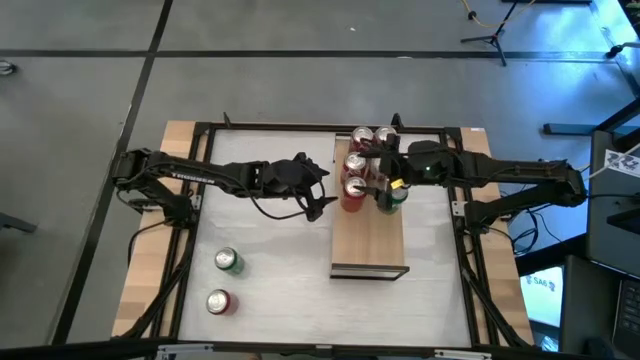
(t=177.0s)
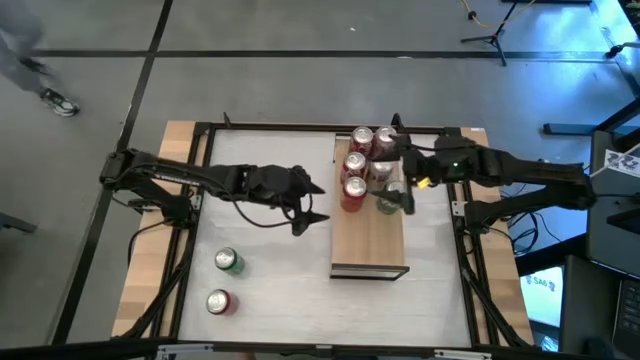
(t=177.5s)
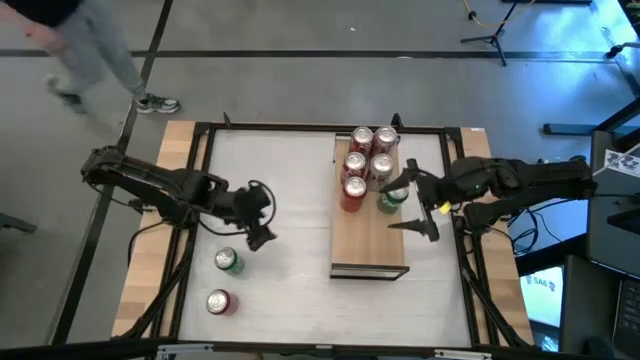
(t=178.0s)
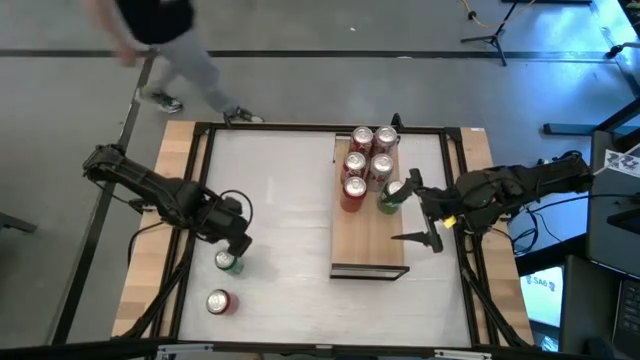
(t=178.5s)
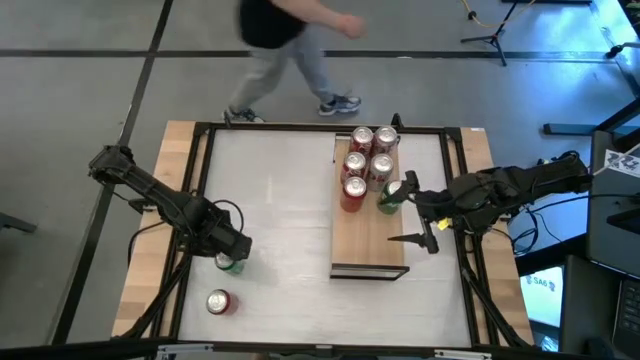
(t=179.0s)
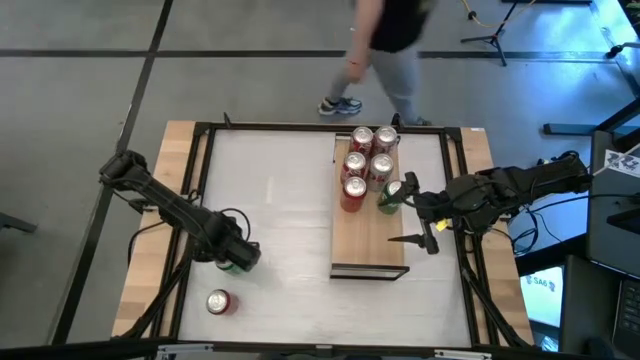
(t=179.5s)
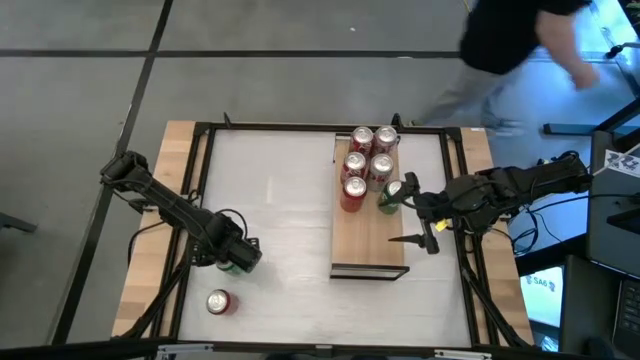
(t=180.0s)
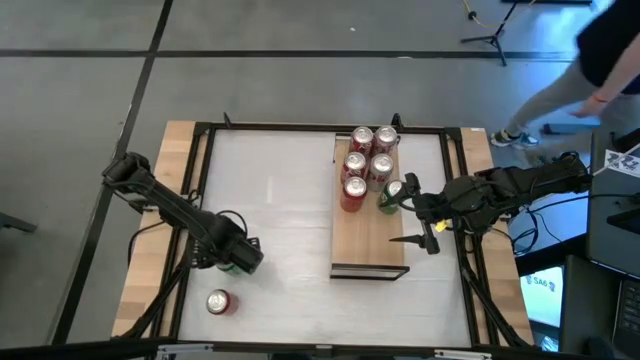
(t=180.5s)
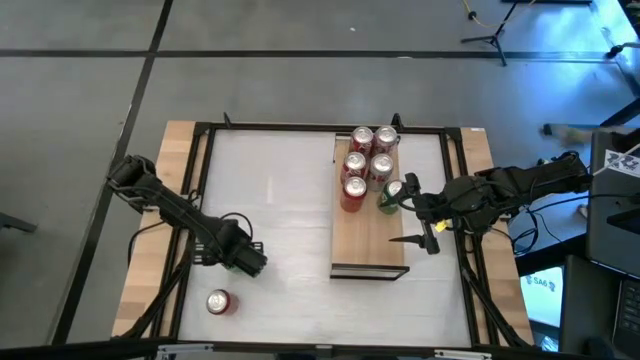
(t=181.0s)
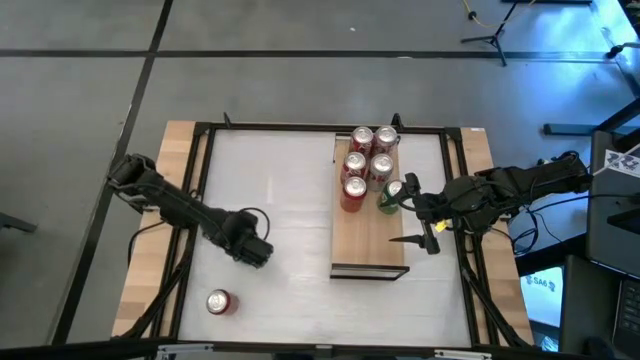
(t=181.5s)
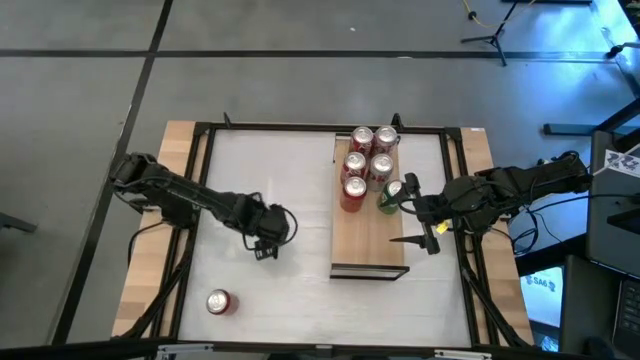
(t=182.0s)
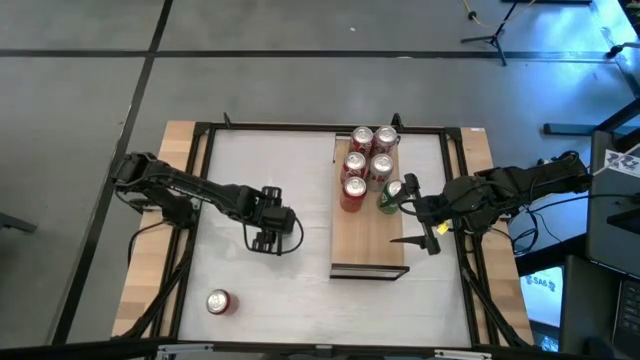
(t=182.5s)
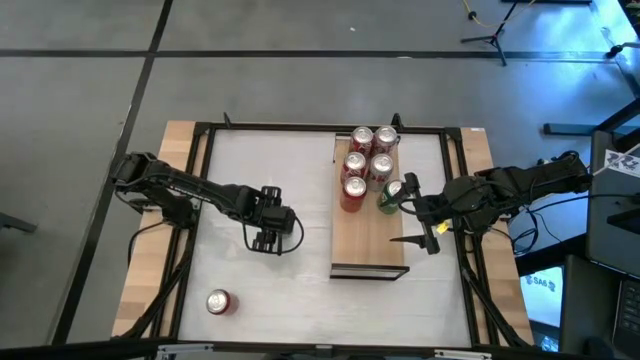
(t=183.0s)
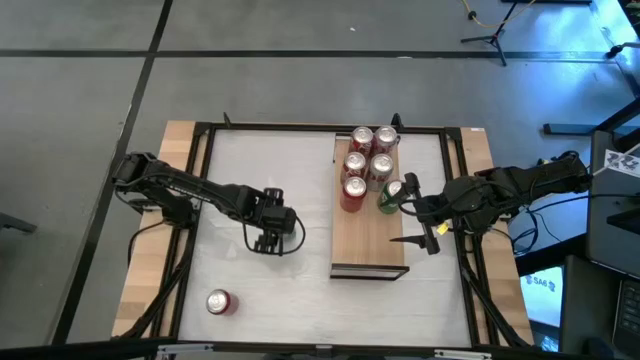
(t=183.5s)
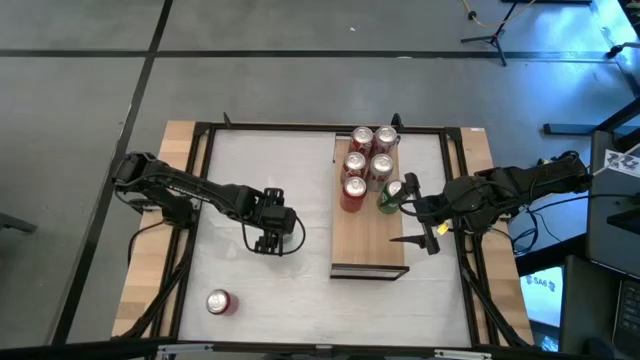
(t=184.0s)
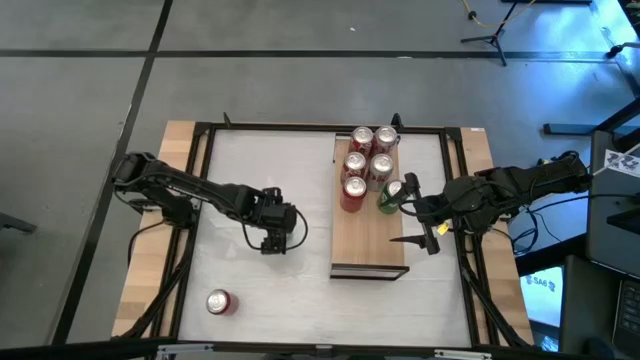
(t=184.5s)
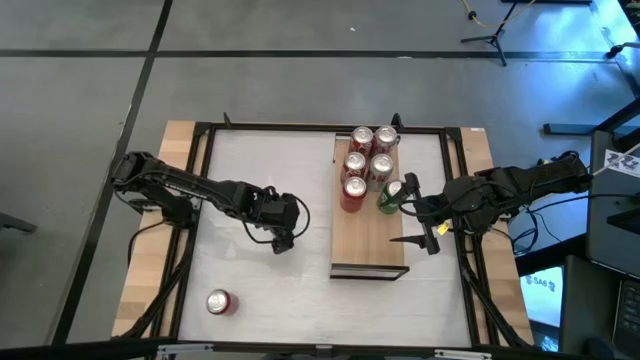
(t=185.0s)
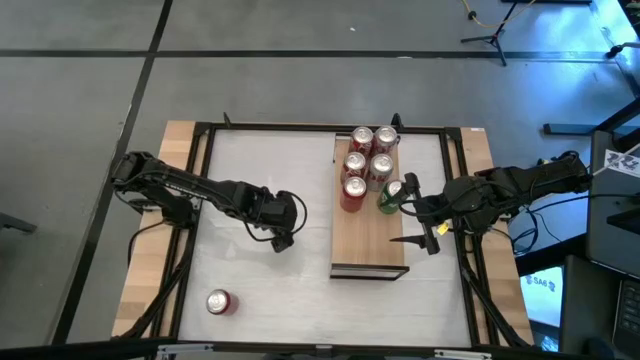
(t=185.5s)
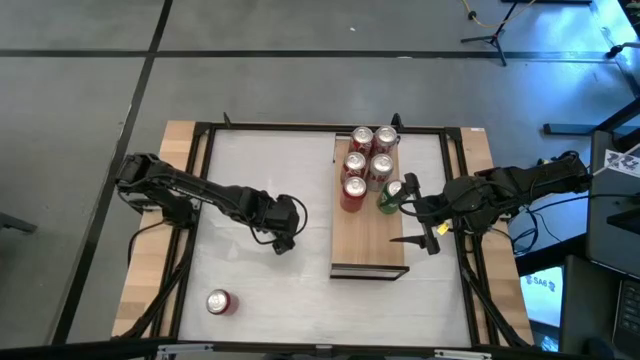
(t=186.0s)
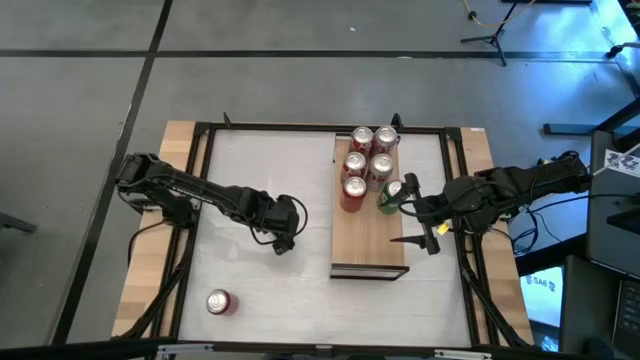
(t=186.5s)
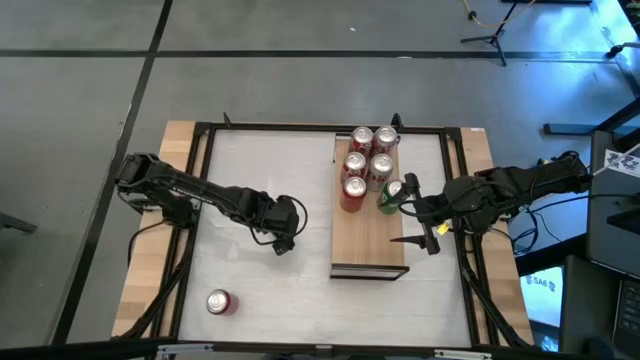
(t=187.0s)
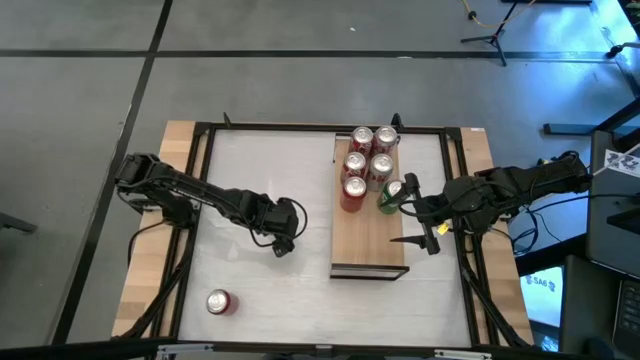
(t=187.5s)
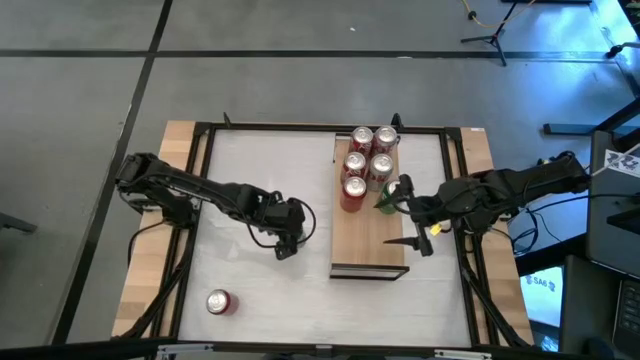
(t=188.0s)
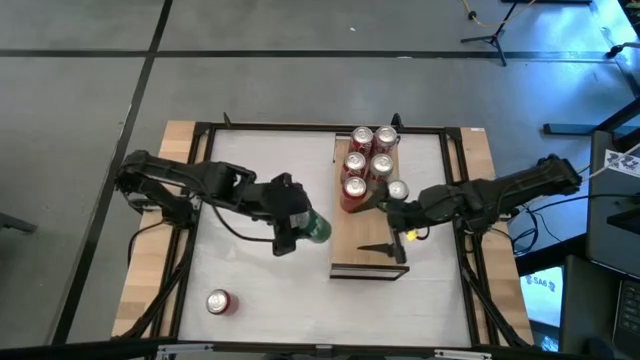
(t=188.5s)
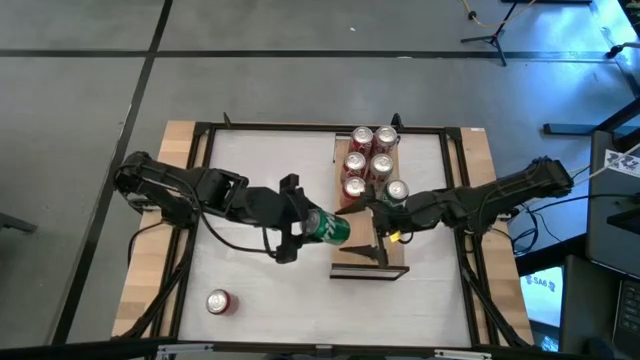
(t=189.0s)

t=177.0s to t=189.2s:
Task: Place canned beverage on shelf
Put the green soda can on the shelf aligned with the other green soda can

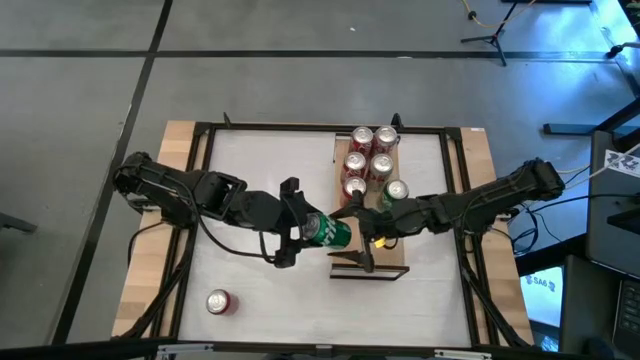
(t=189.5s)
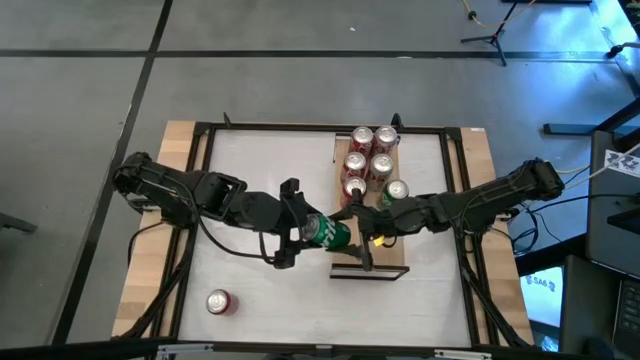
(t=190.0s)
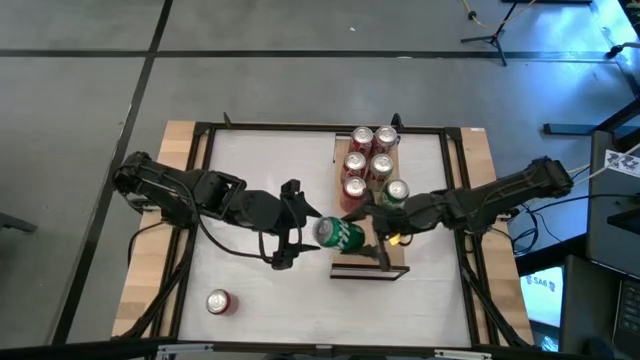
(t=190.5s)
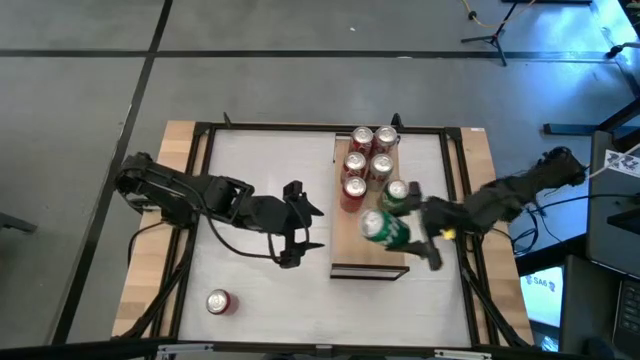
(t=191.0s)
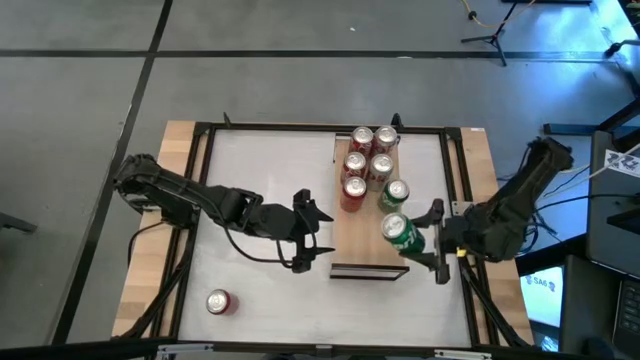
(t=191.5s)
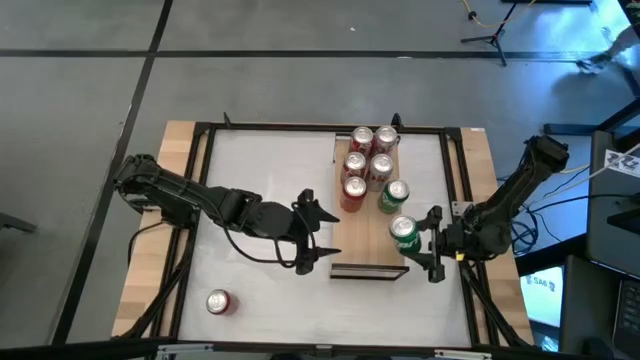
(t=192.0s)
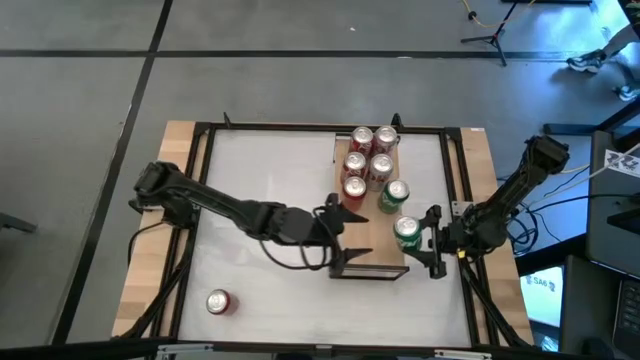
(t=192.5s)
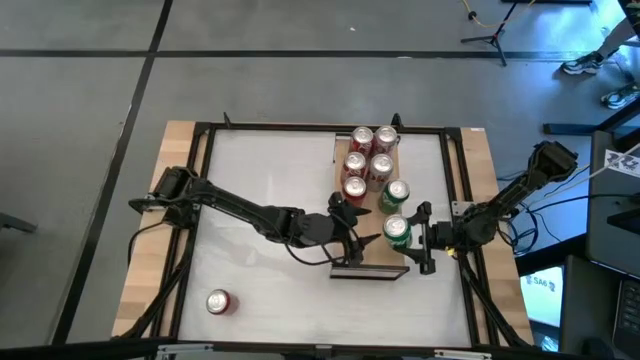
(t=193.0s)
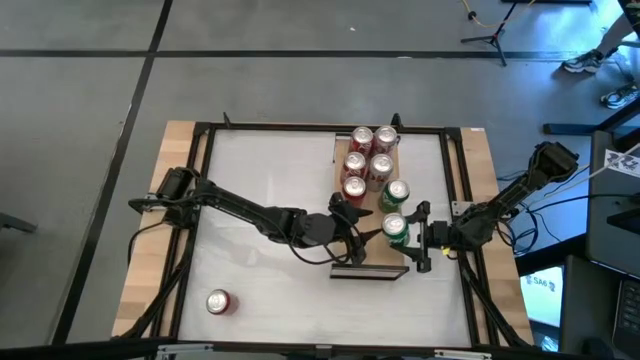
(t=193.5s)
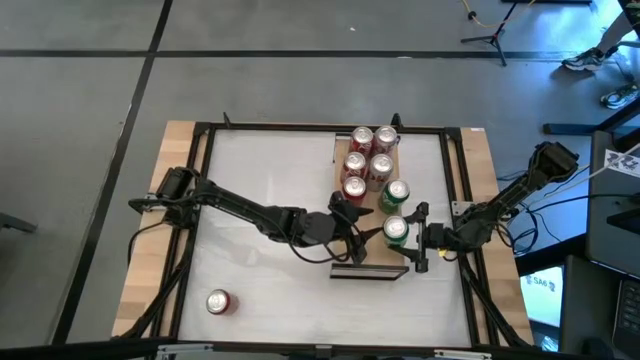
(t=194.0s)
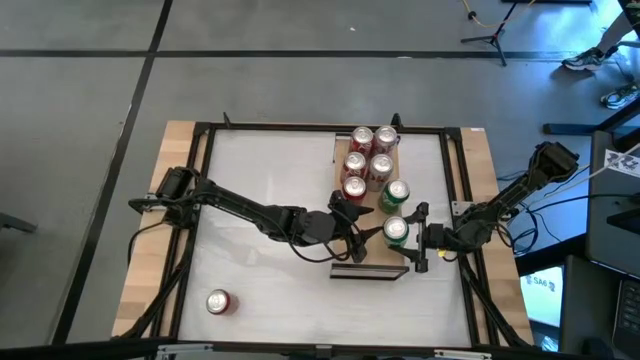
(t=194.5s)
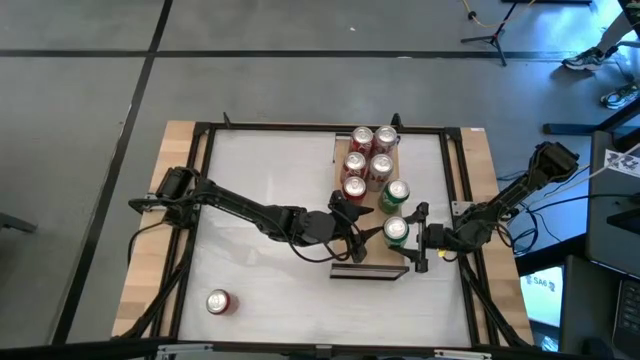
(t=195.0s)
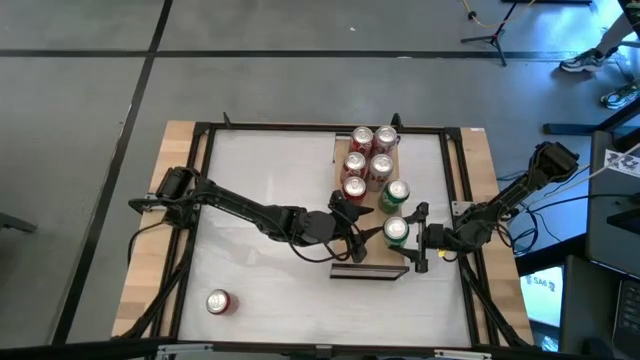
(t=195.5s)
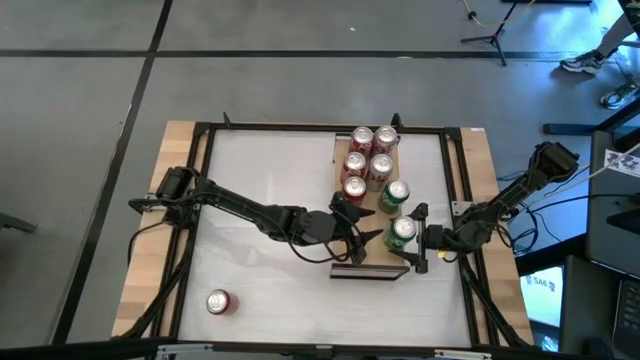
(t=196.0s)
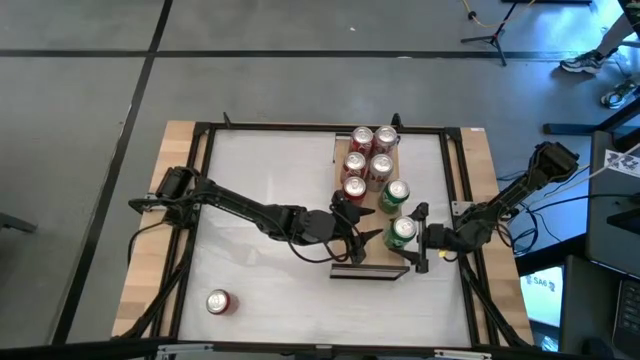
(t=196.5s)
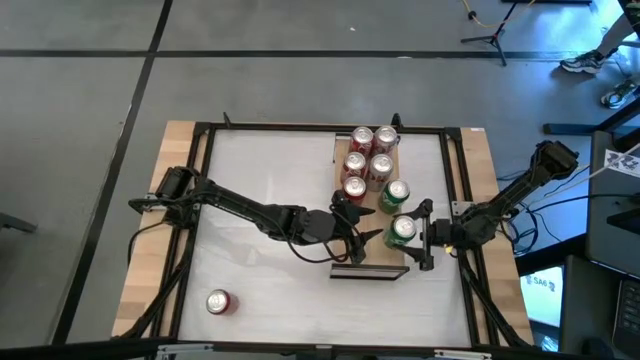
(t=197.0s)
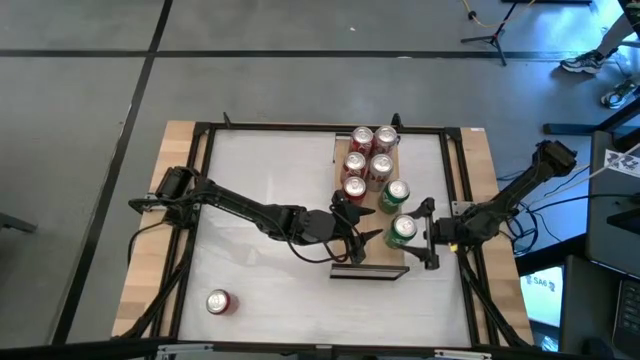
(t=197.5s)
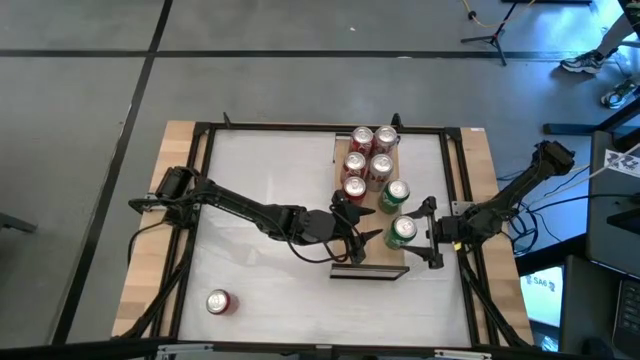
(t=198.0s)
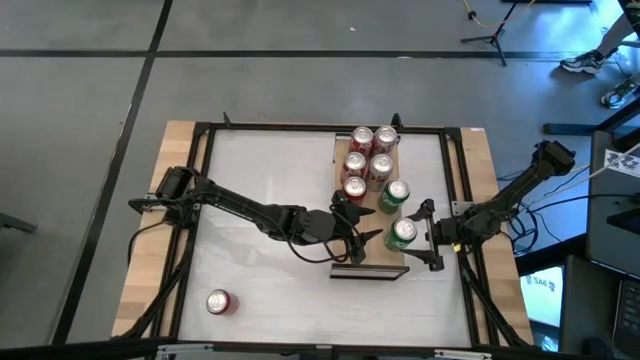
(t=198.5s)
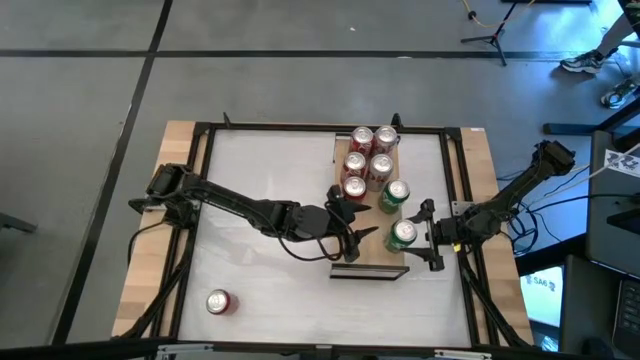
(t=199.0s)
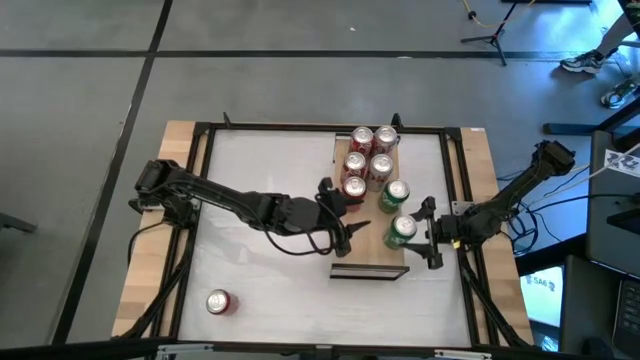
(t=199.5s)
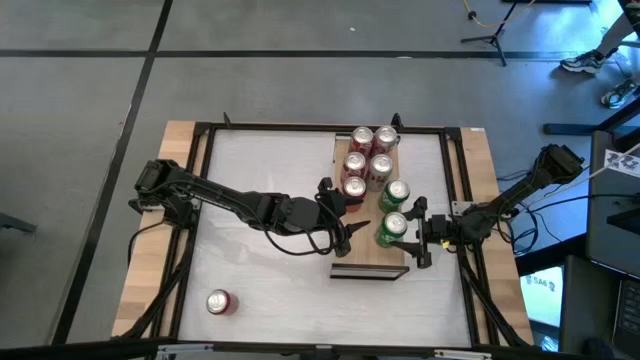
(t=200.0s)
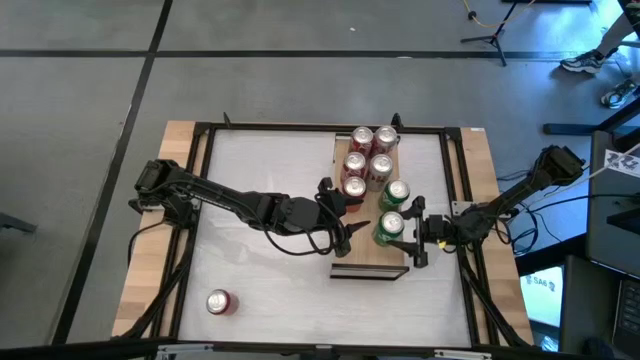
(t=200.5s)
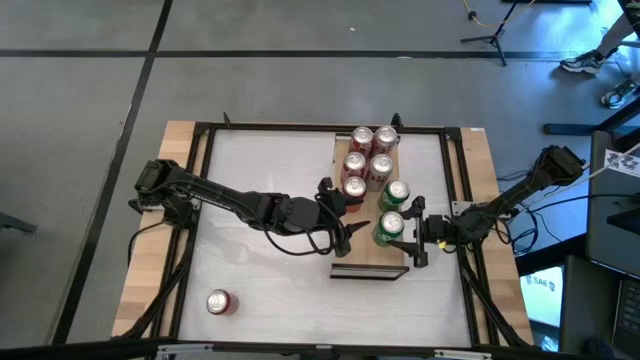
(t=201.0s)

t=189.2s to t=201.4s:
Put the green soda can on the shelf aligned with the other green soda can
